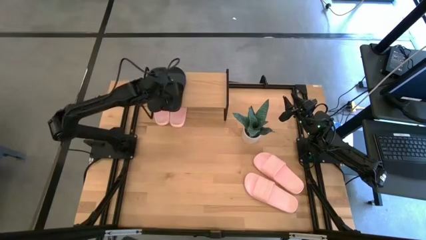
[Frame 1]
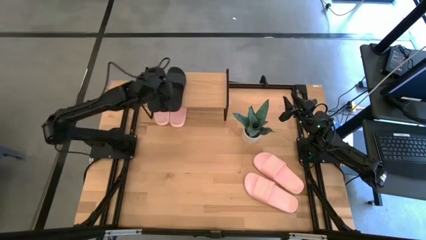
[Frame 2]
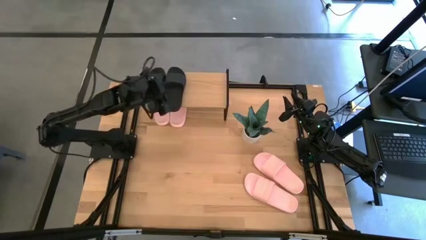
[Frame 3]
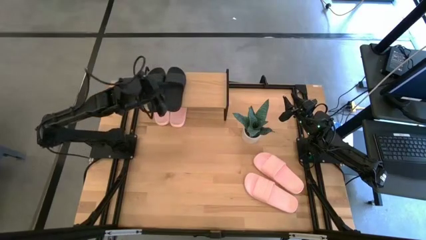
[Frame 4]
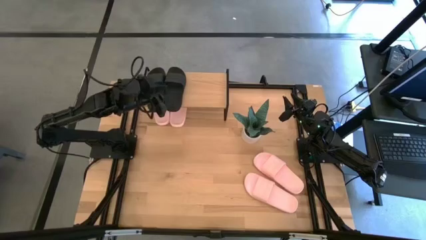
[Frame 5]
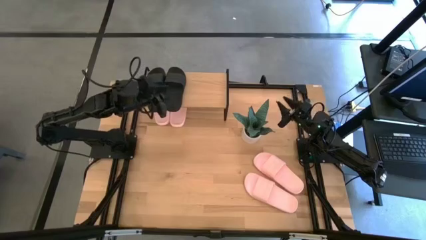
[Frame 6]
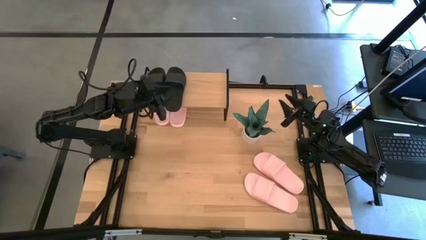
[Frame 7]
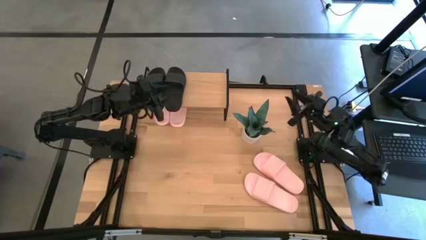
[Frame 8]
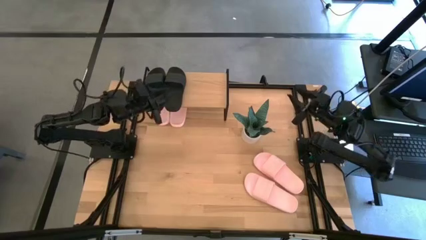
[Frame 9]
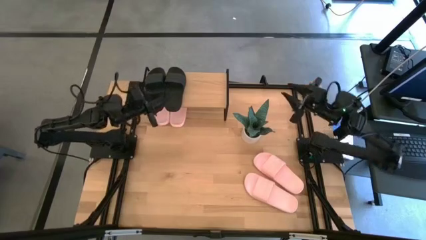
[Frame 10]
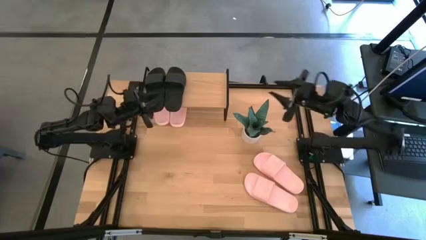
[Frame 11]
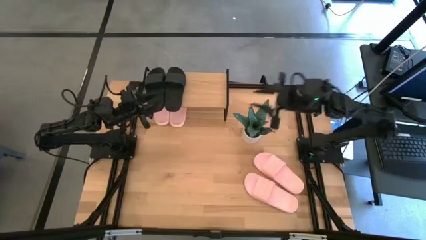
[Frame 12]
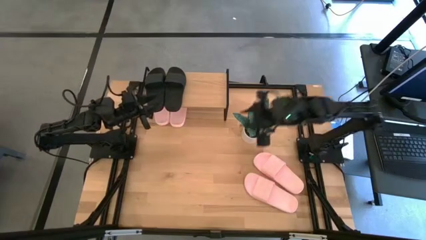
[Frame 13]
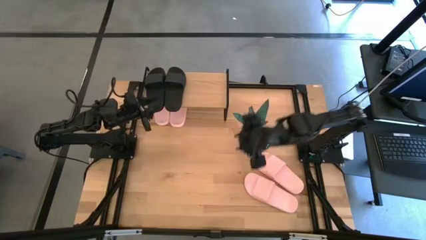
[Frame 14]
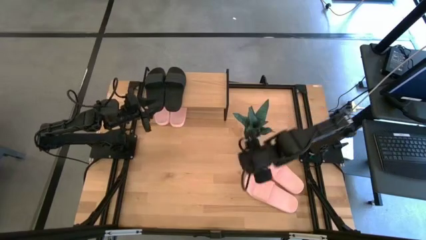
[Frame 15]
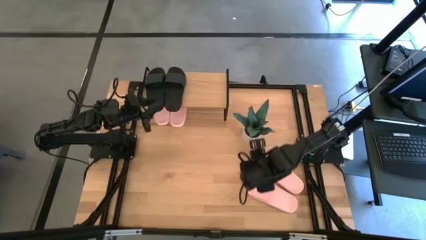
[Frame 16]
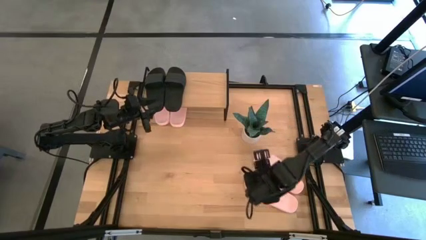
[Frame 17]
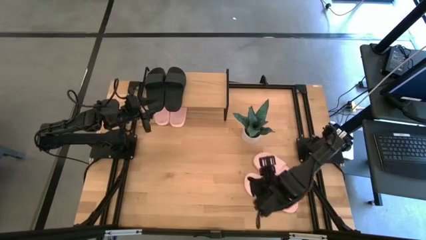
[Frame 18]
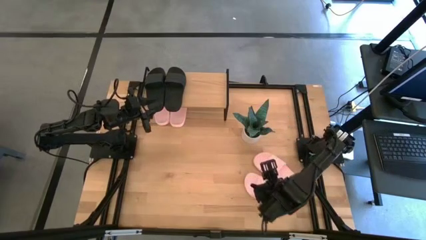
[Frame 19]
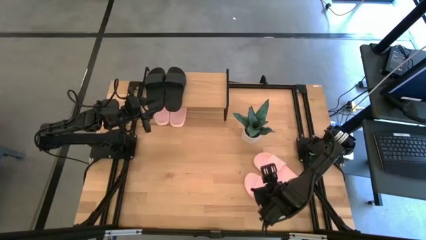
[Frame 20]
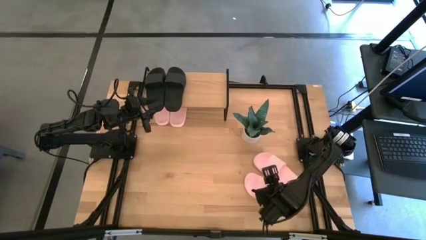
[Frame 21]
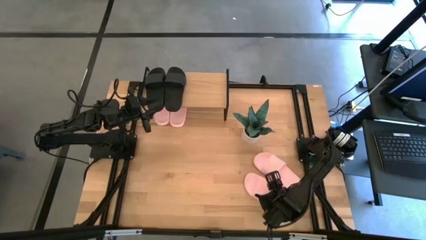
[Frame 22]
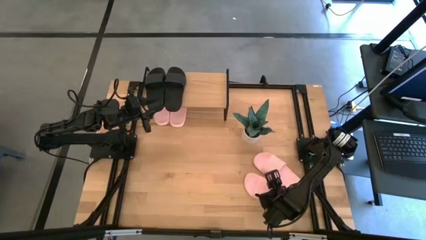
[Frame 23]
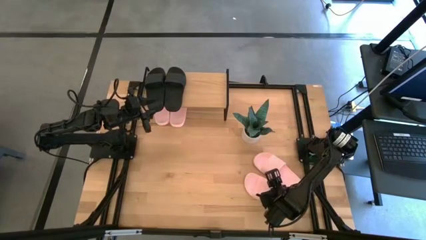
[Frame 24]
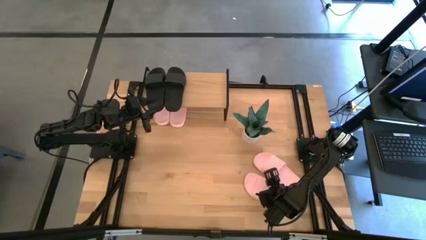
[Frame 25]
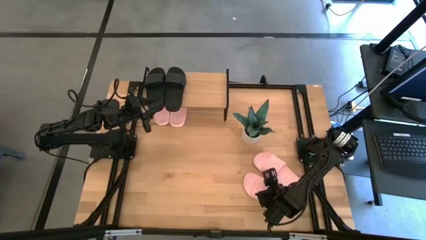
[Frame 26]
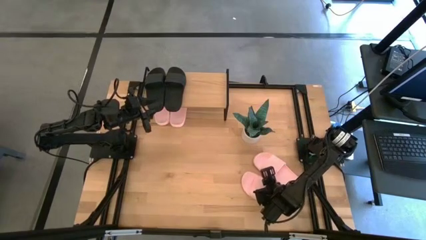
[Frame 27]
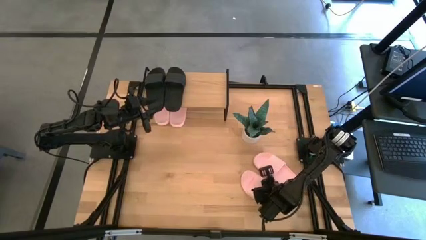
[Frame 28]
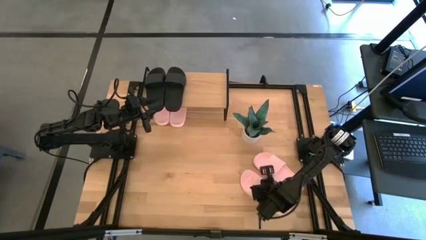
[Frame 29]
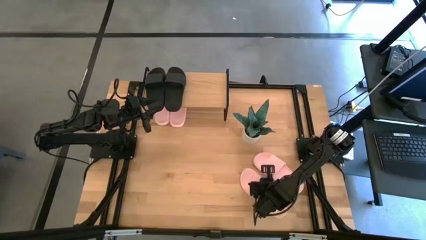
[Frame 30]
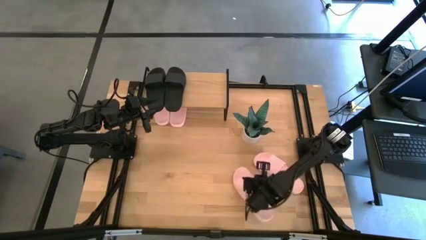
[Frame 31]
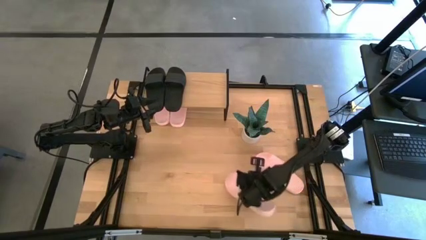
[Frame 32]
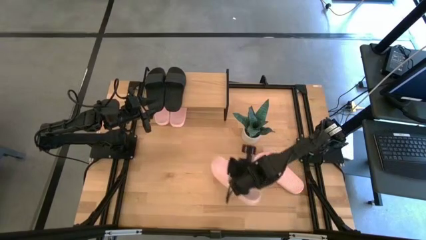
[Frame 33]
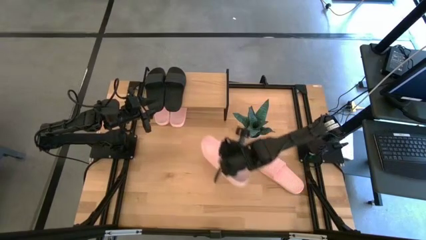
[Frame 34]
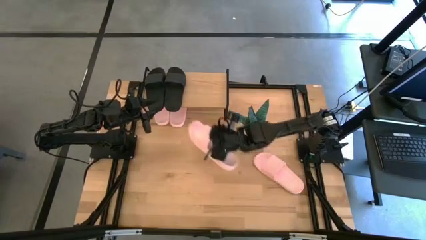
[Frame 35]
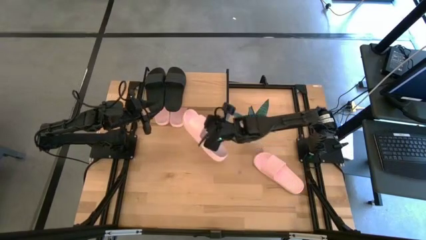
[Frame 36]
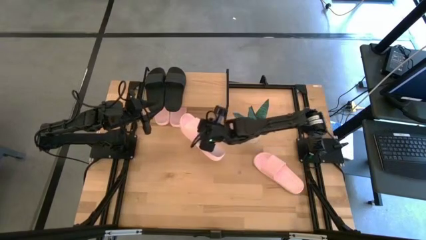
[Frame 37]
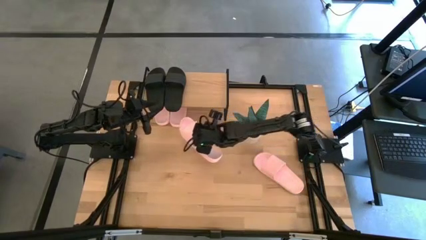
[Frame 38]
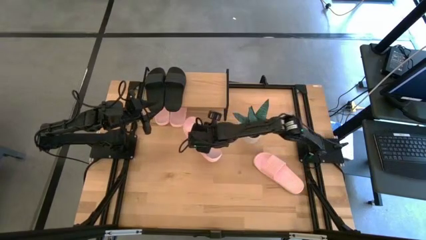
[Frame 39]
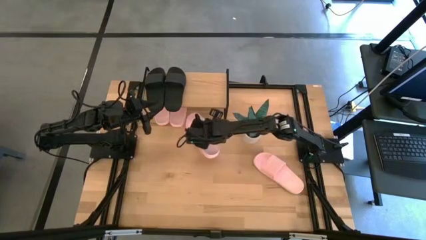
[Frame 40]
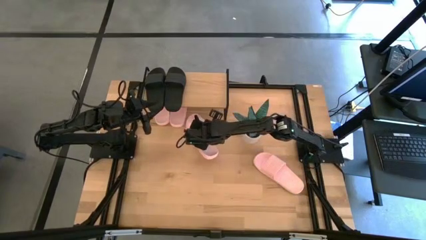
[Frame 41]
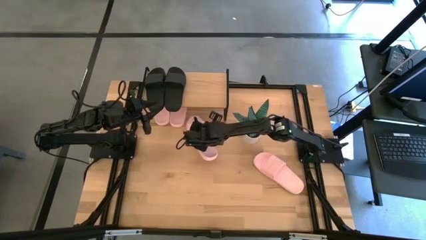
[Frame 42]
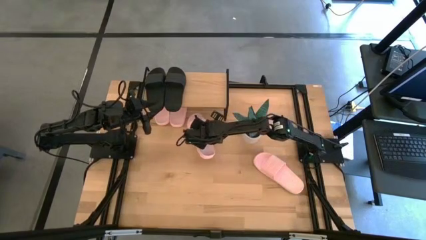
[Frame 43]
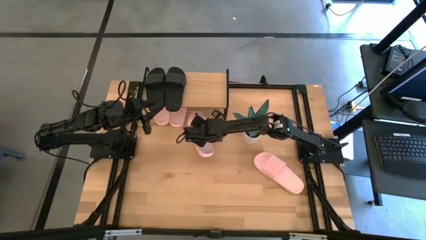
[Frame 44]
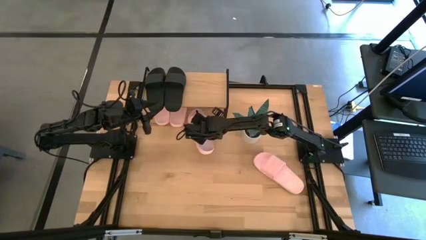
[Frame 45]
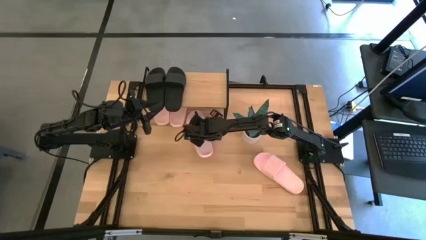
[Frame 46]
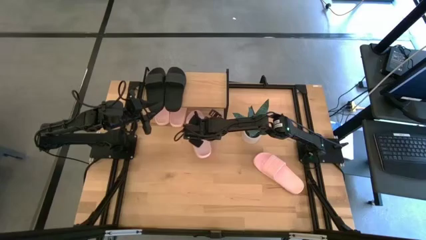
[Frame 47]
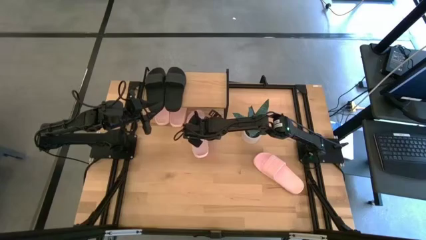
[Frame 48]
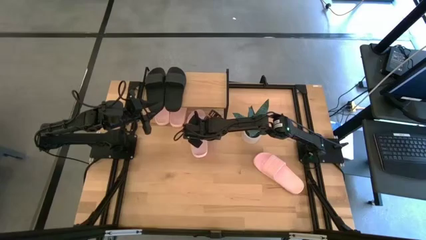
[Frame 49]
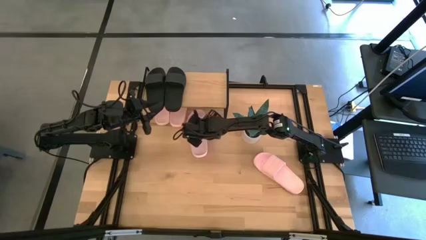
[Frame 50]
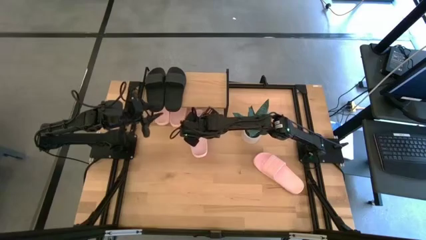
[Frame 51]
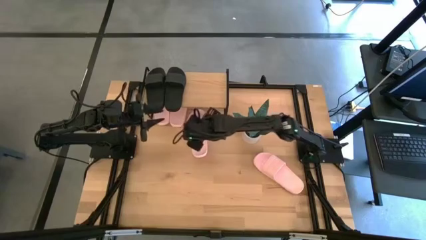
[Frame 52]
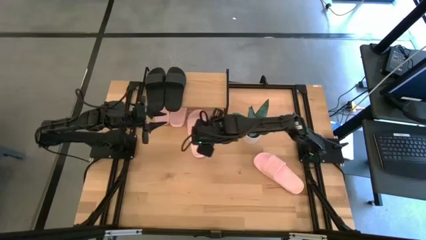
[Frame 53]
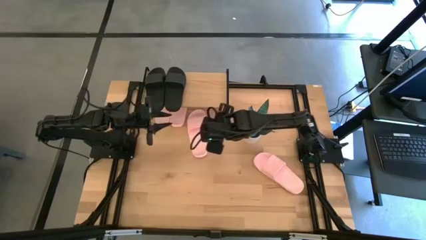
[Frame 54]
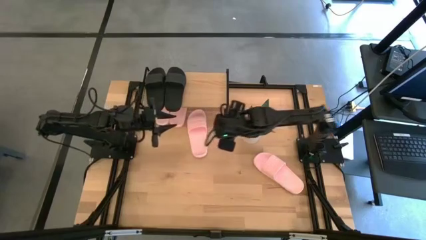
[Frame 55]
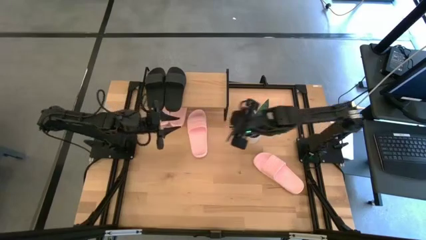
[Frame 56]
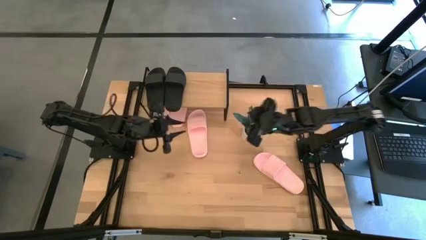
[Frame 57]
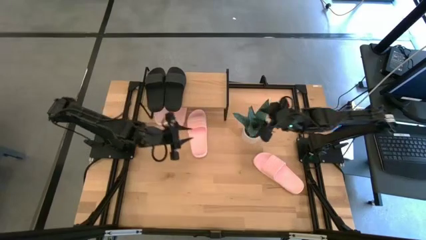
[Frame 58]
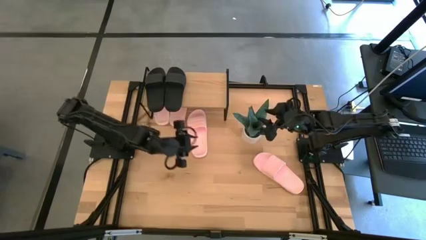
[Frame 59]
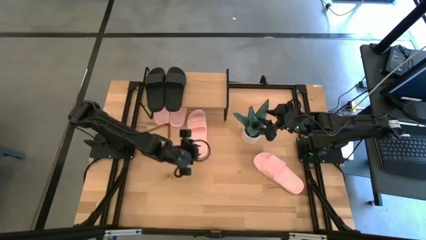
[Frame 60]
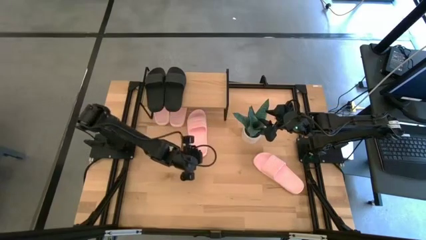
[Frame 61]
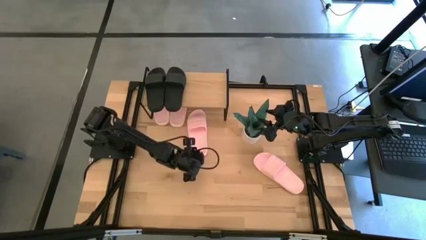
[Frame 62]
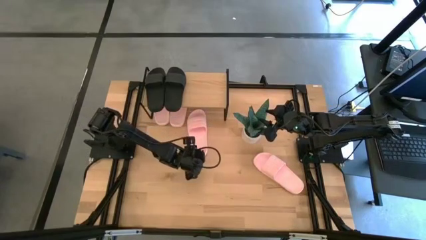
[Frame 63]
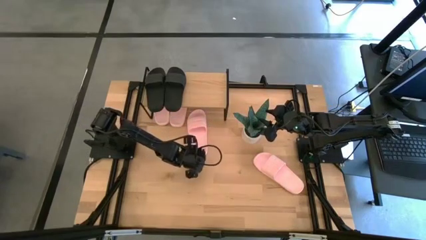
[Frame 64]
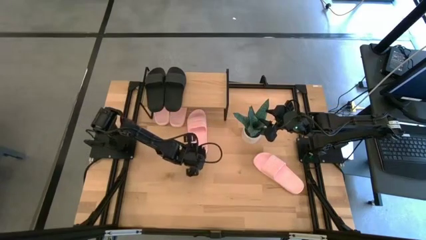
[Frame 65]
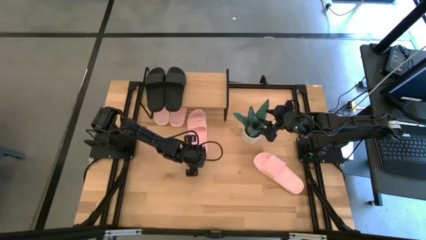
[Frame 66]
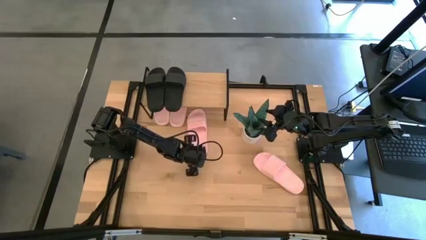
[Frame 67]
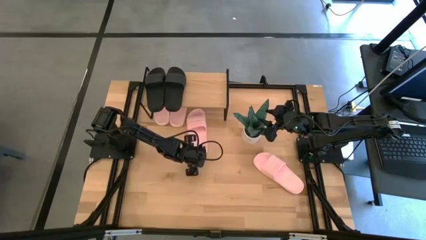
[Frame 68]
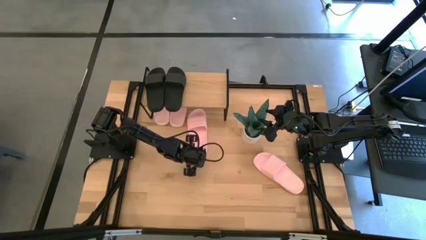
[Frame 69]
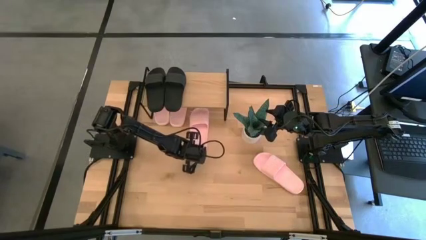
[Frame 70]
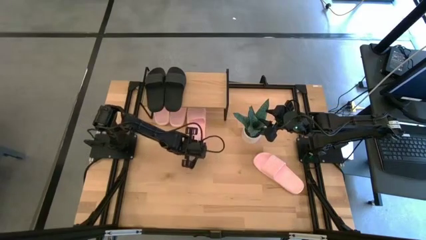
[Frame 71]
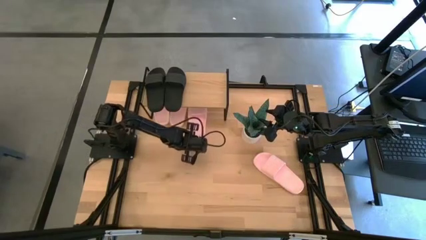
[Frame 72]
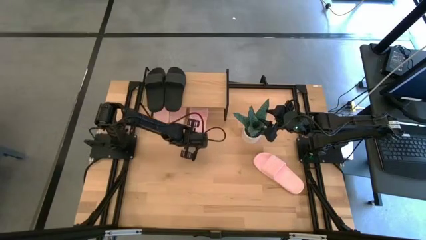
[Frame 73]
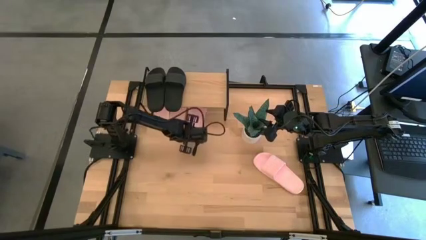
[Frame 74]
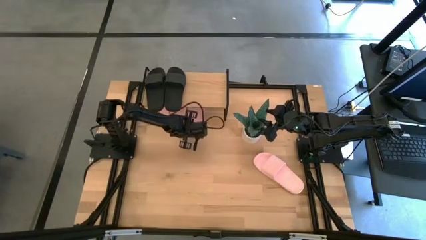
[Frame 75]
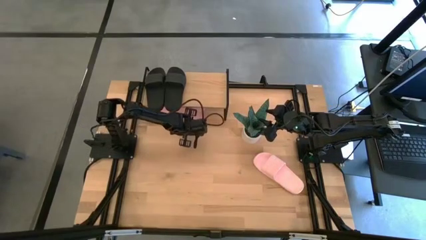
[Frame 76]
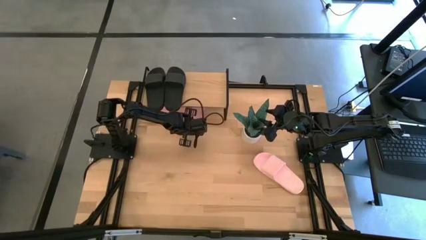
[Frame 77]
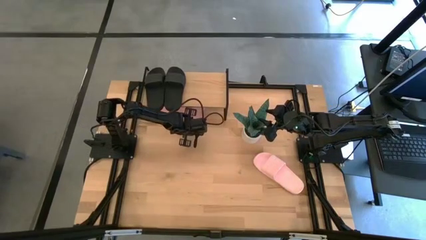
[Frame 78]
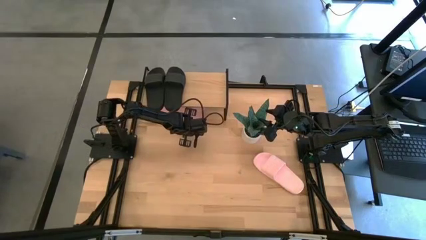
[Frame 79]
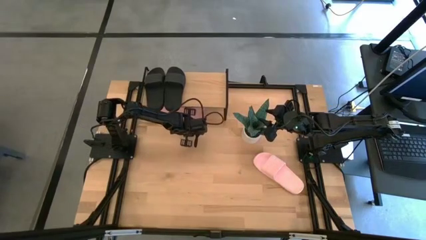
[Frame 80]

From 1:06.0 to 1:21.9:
Task: Pick and place slides into the shelf
Put the pink slipper under the shelf
